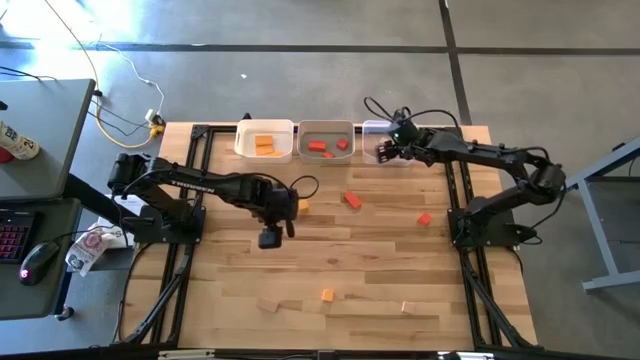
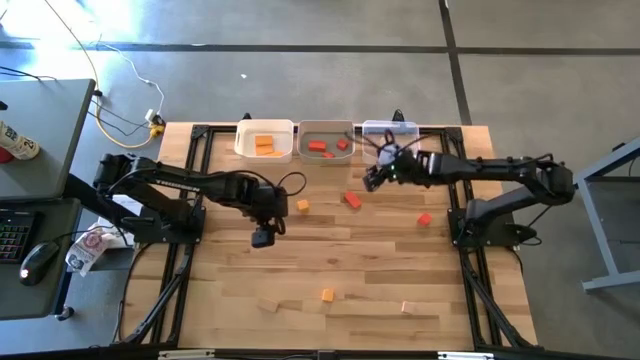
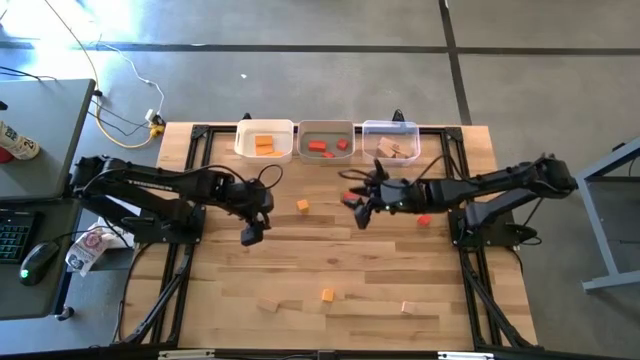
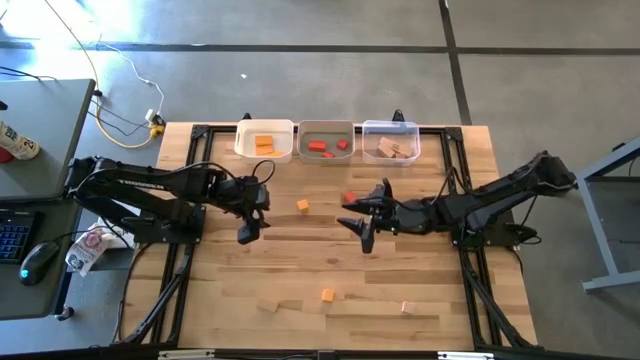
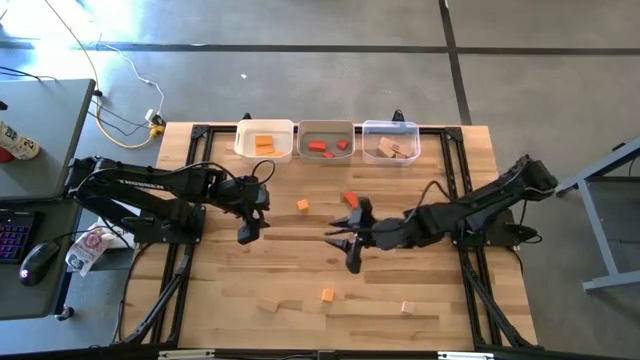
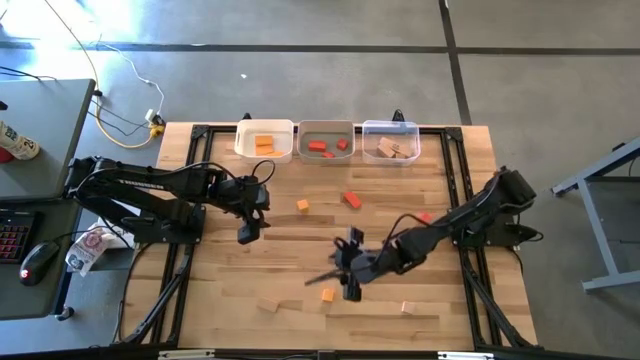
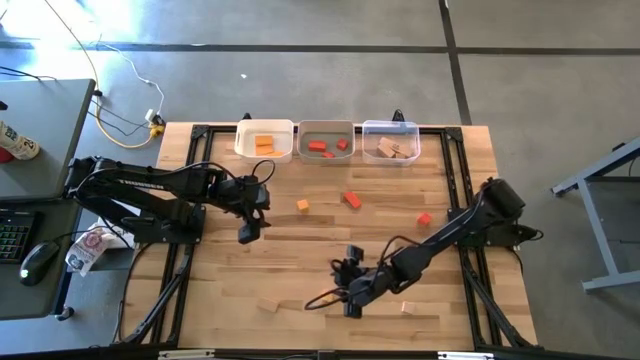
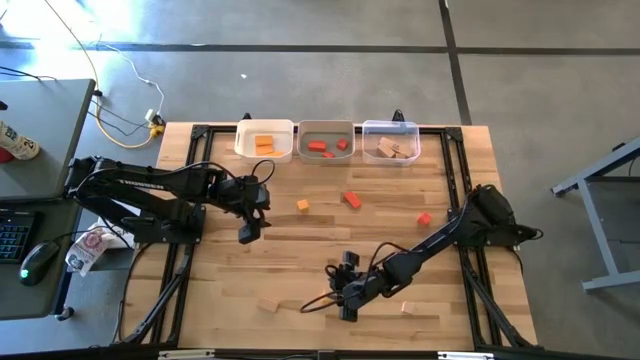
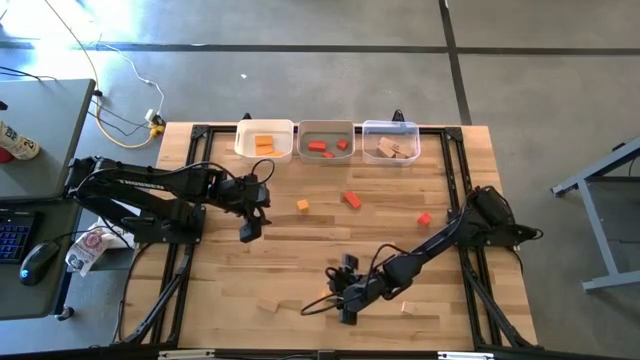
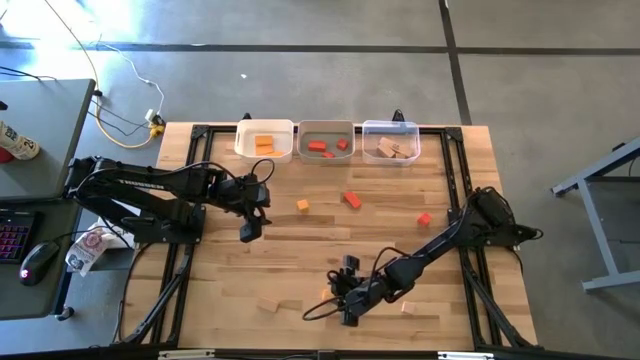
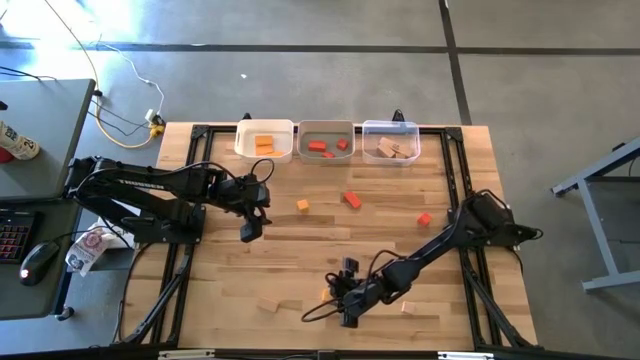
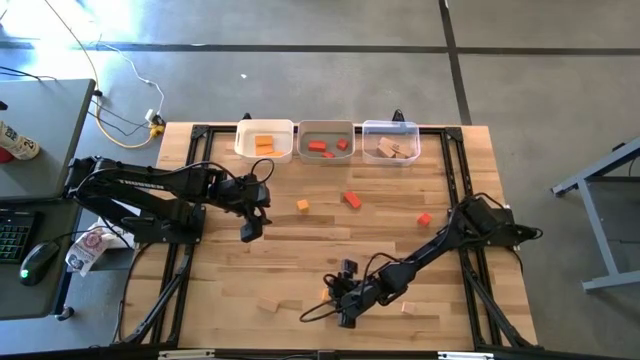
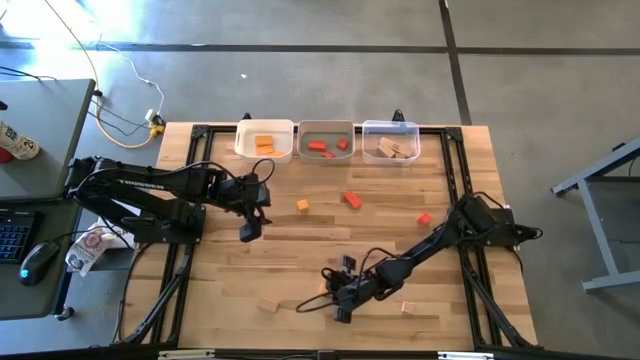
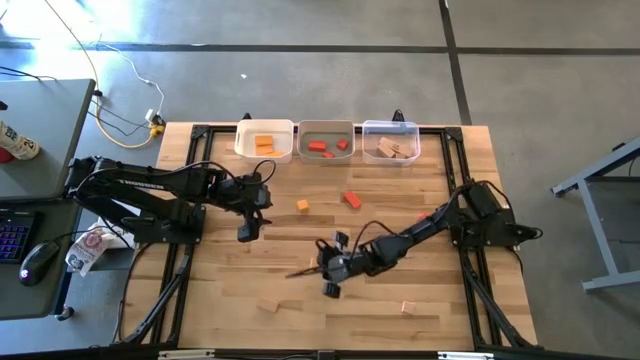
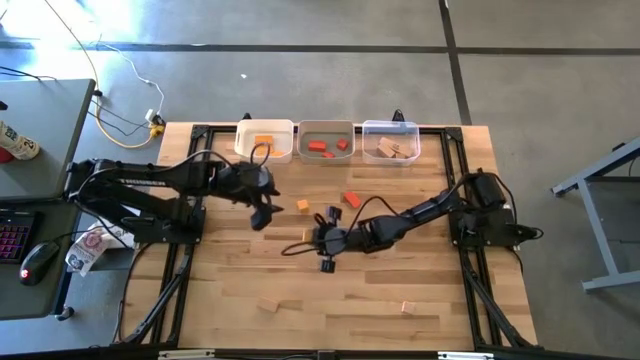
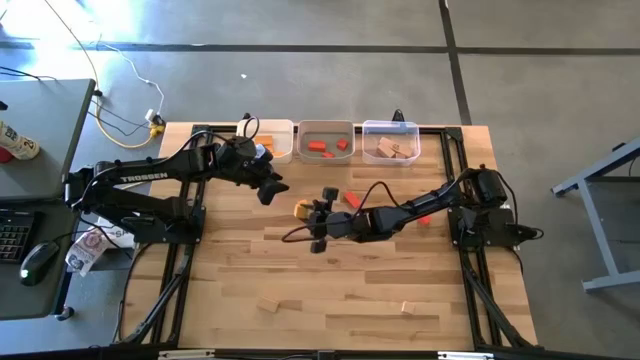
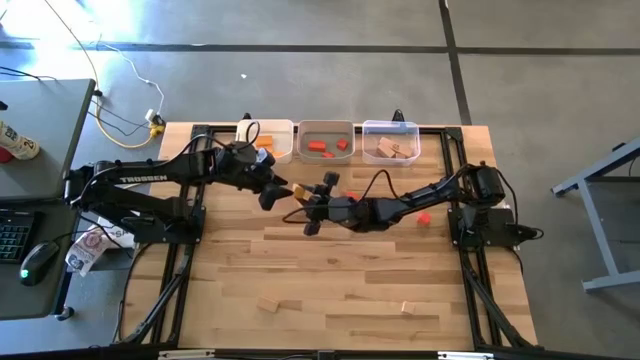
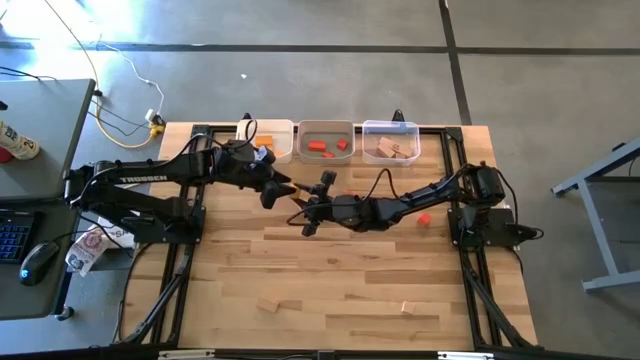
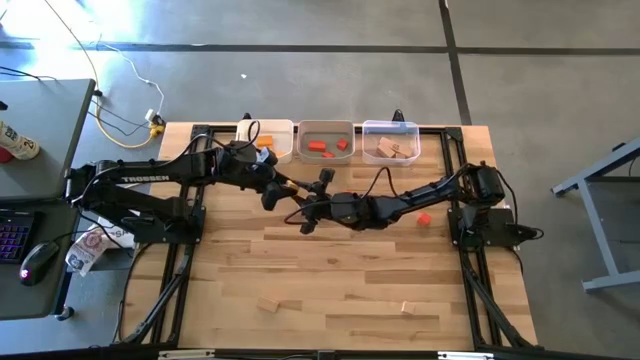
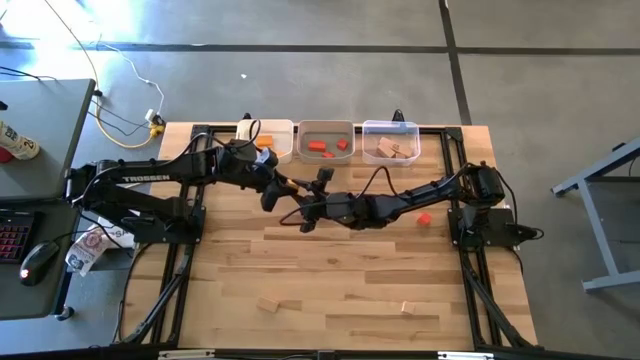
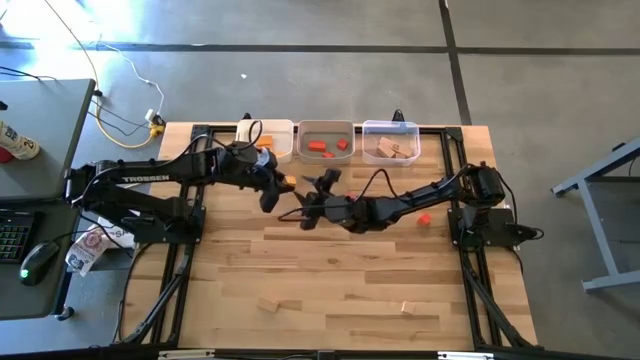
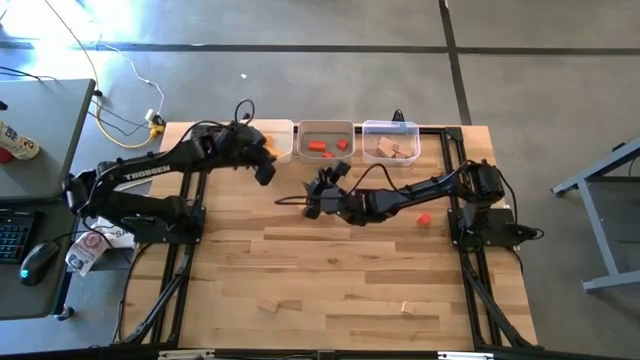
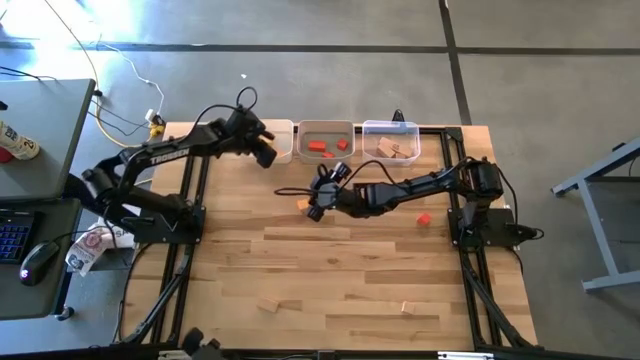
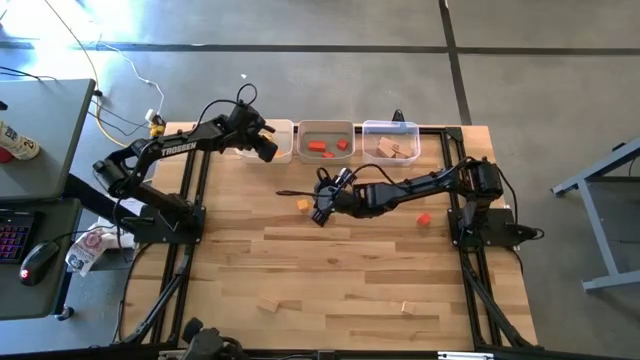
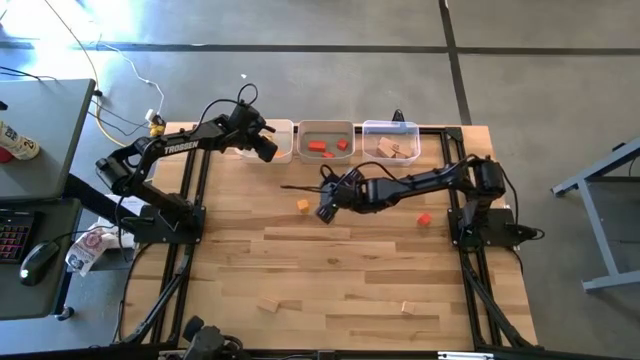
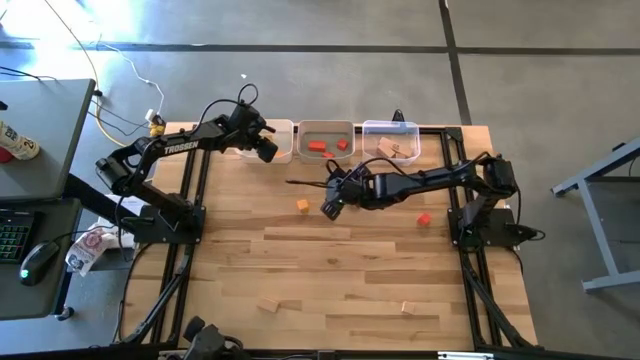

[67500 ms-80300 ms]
Task: Sort & place blocks by color
Put the yellow block into the white bin

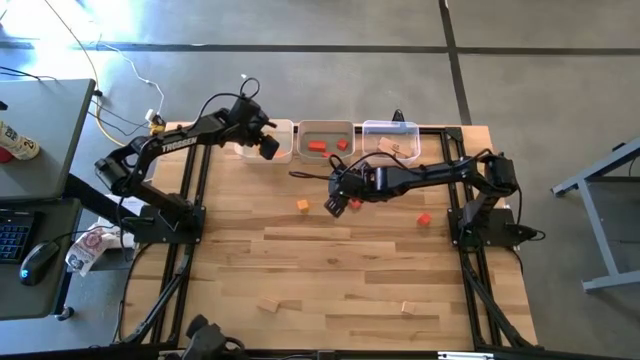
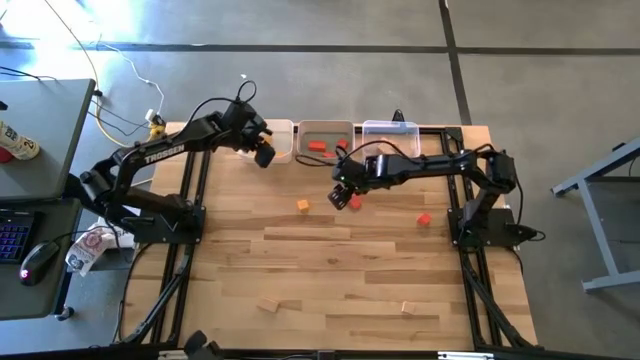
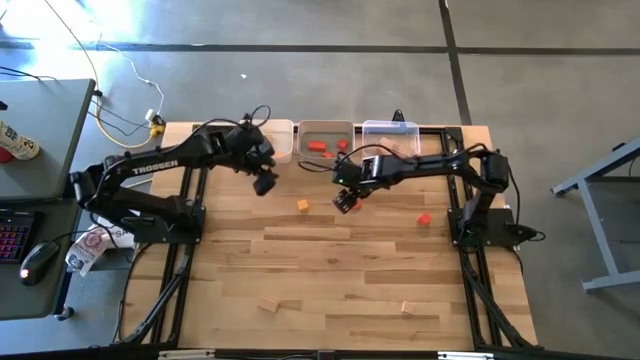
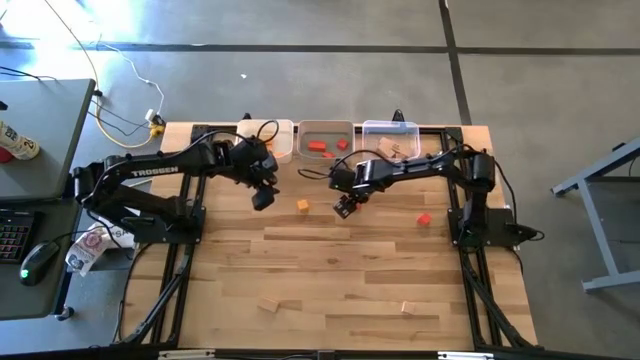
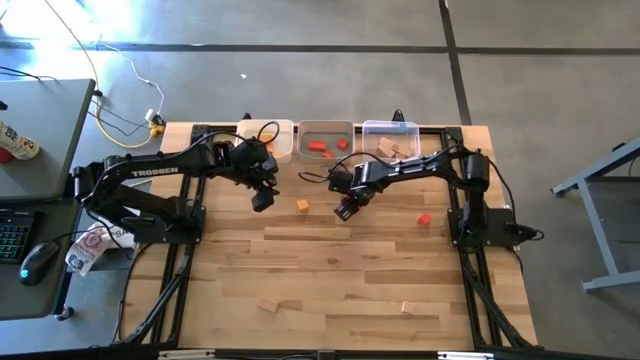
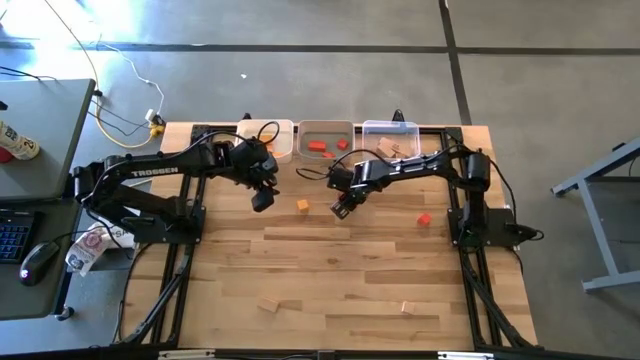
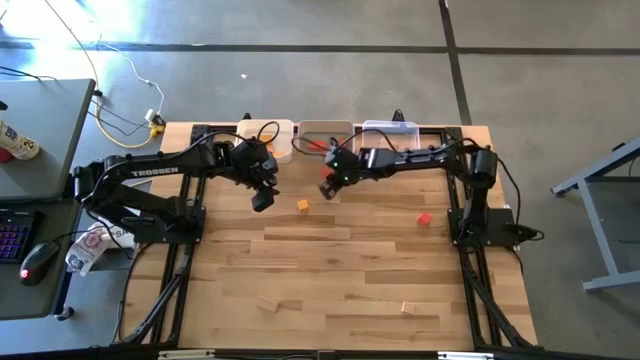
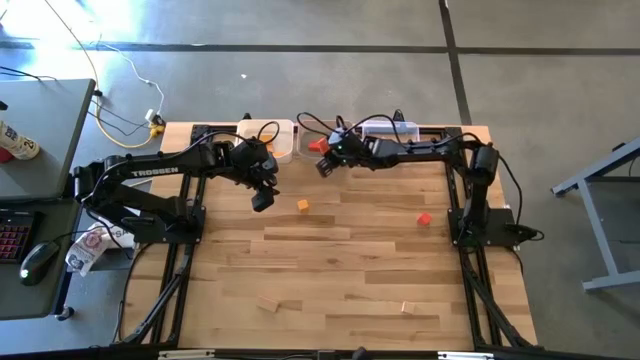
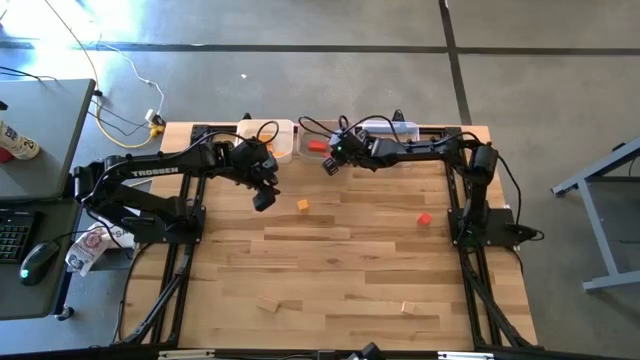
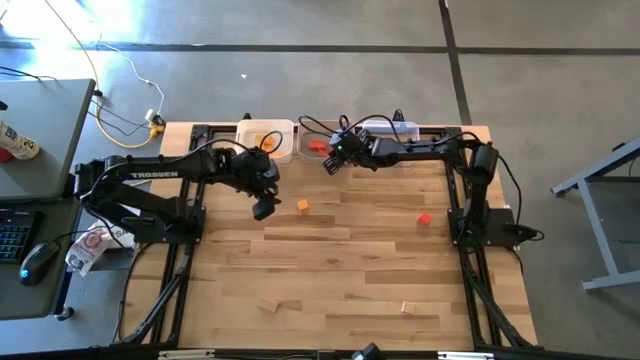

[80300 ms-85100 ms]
Put the orange block into the gray bin

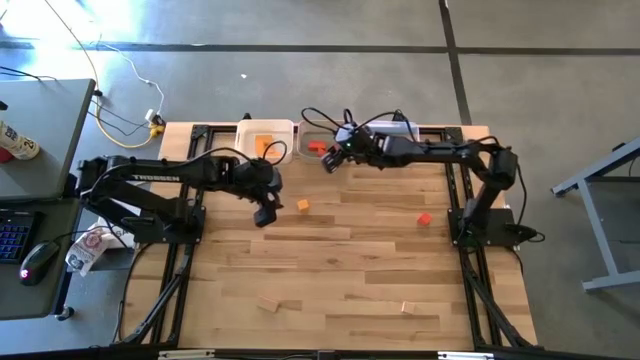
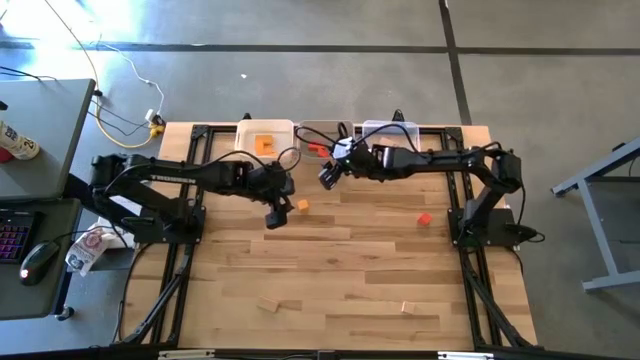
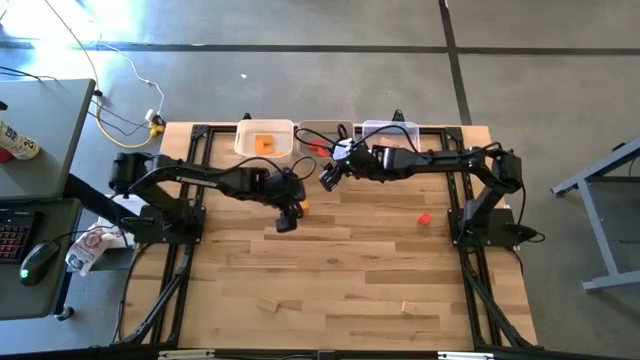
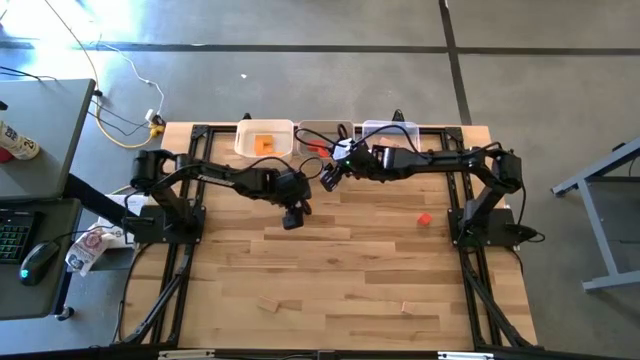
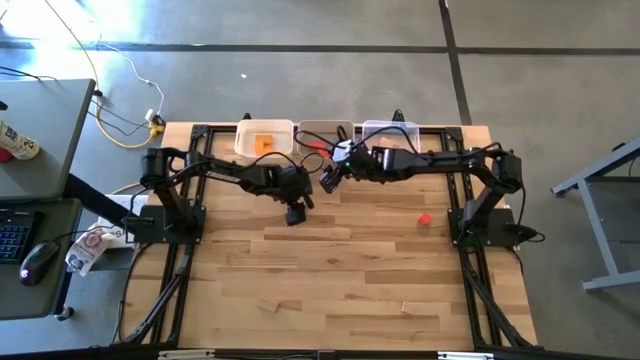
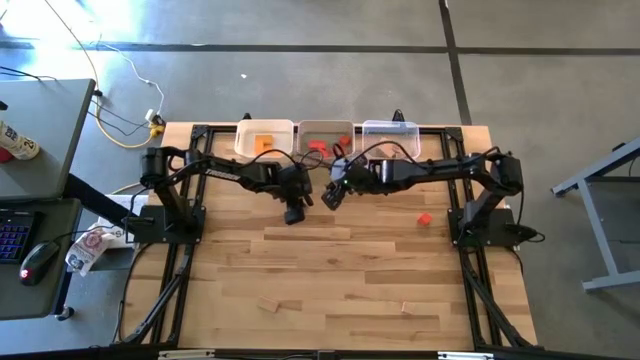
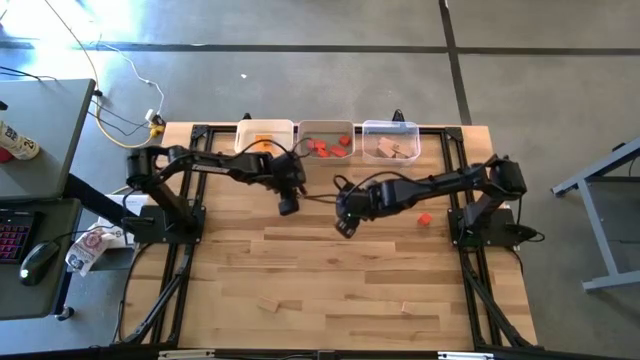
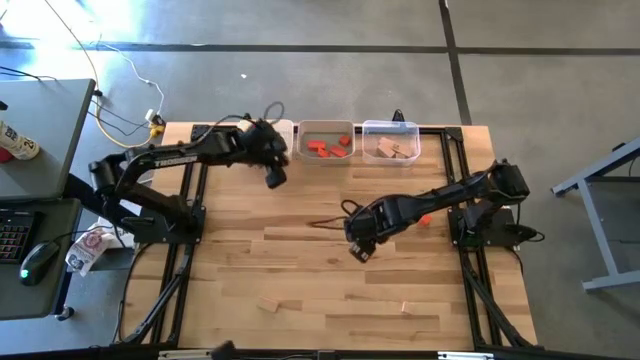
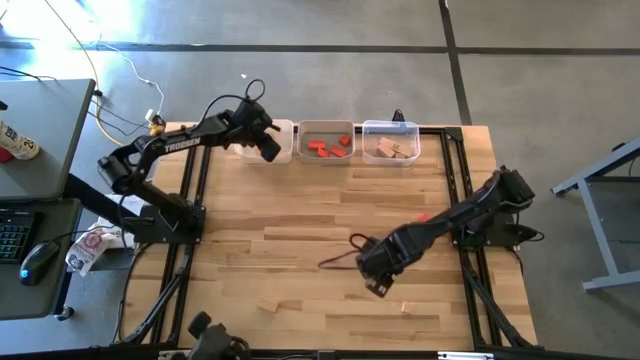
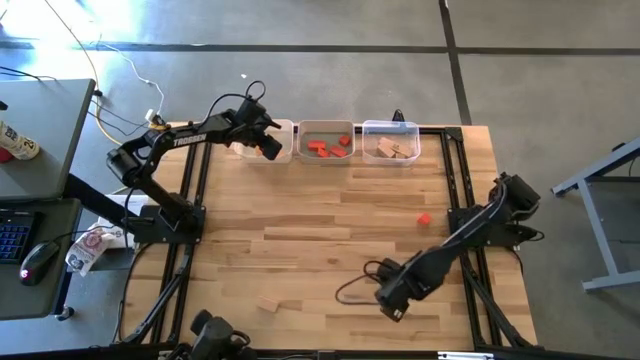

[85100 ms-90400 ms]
Put the yellow block into the white bin
